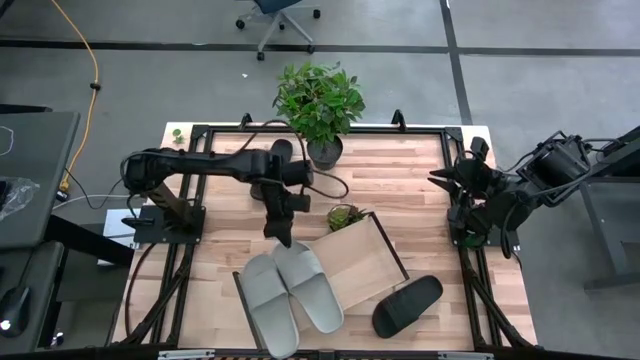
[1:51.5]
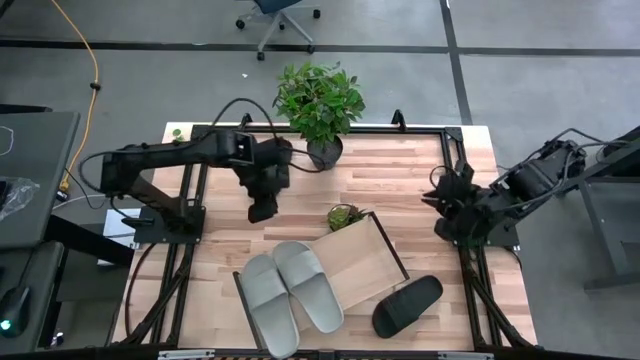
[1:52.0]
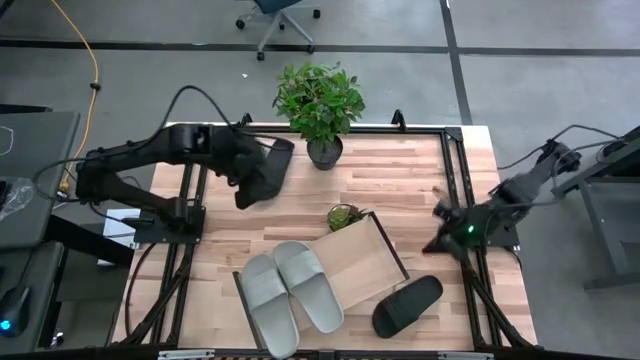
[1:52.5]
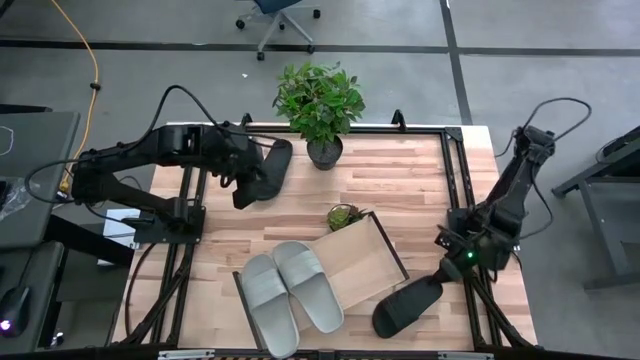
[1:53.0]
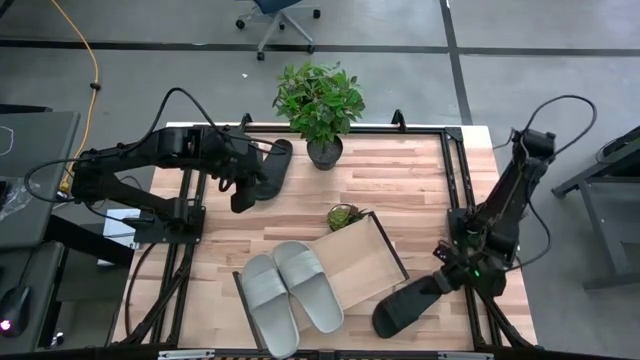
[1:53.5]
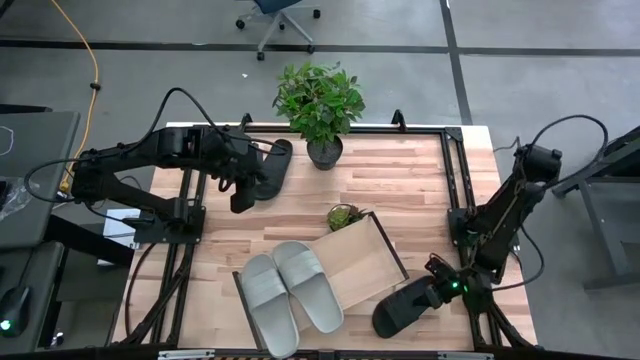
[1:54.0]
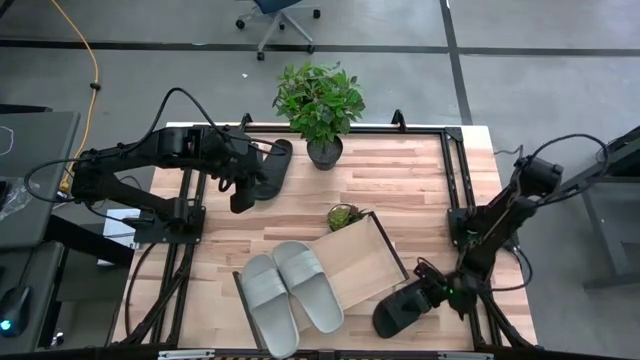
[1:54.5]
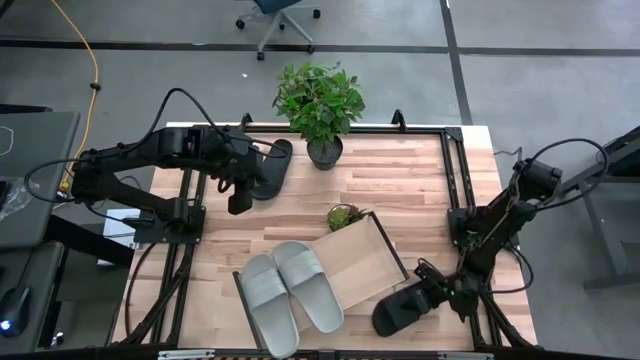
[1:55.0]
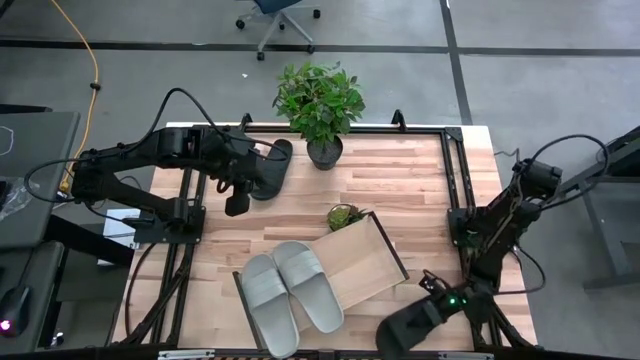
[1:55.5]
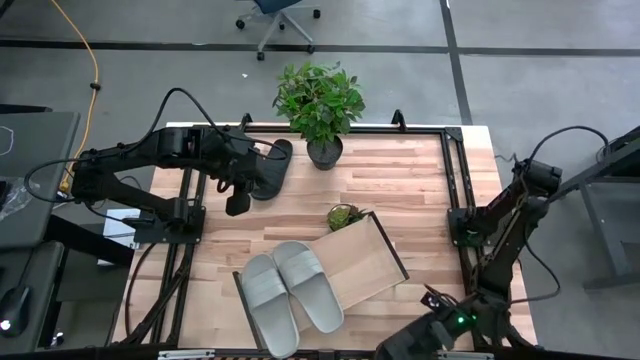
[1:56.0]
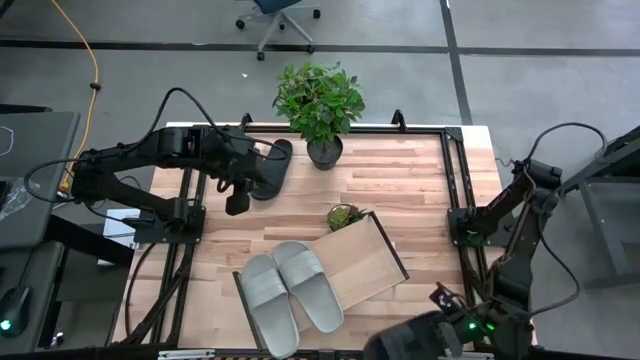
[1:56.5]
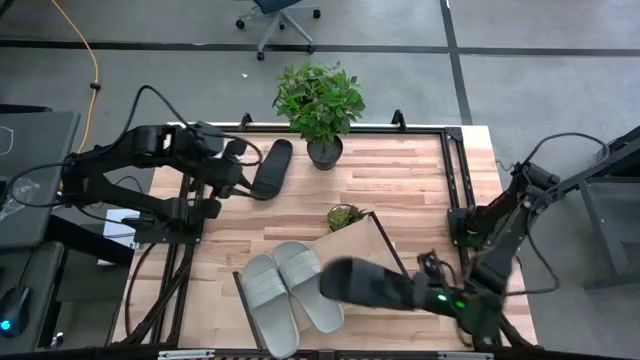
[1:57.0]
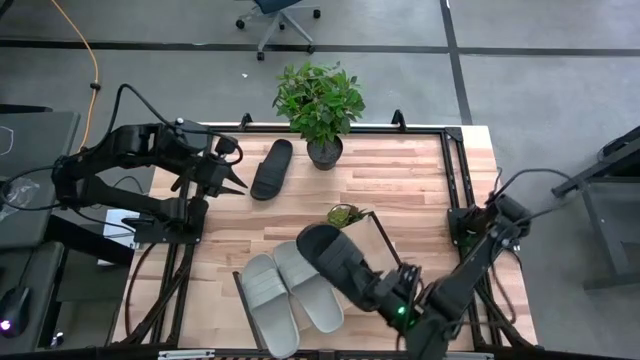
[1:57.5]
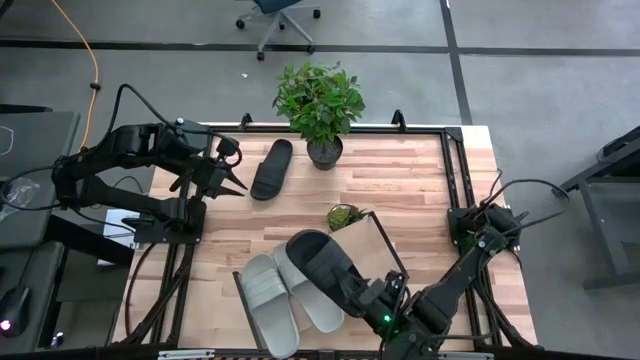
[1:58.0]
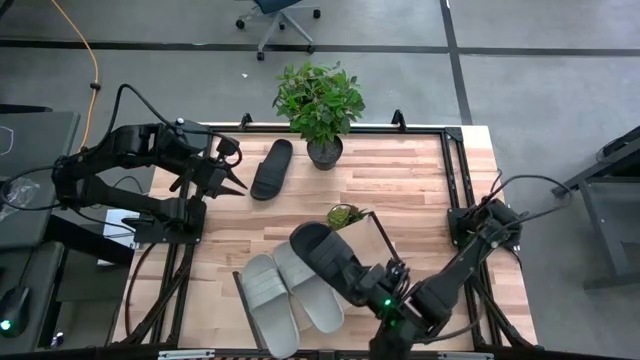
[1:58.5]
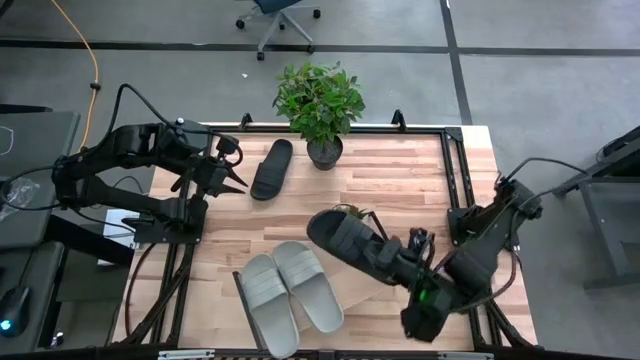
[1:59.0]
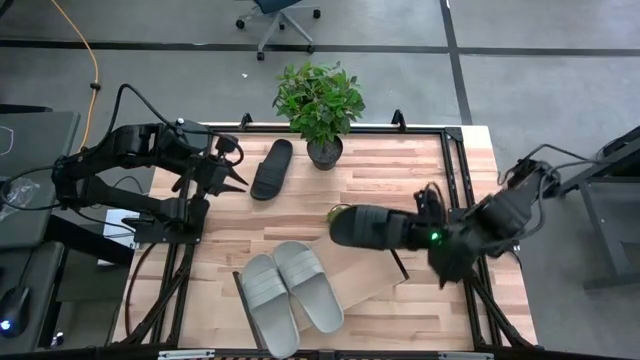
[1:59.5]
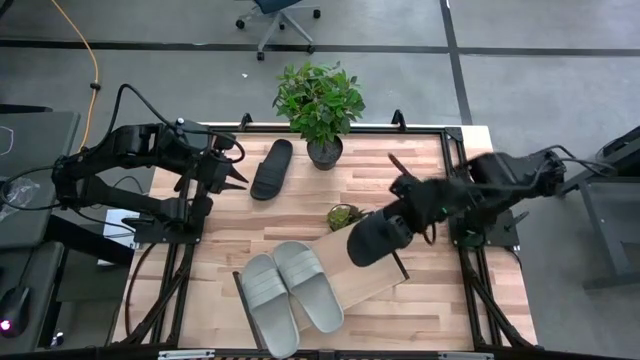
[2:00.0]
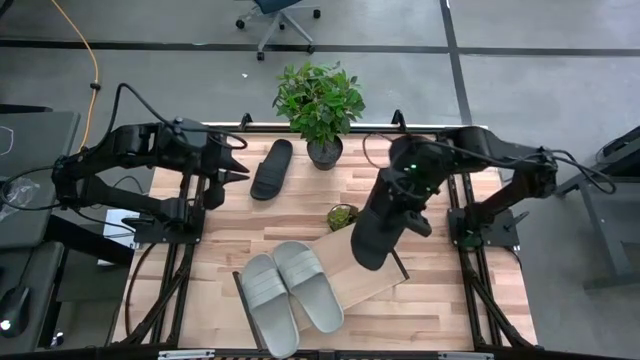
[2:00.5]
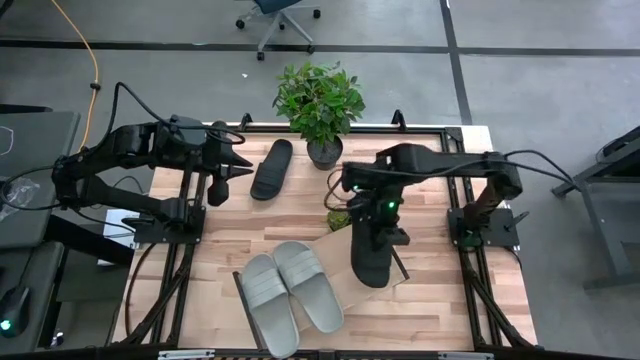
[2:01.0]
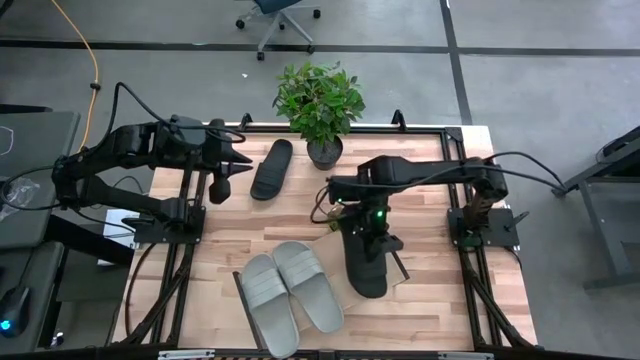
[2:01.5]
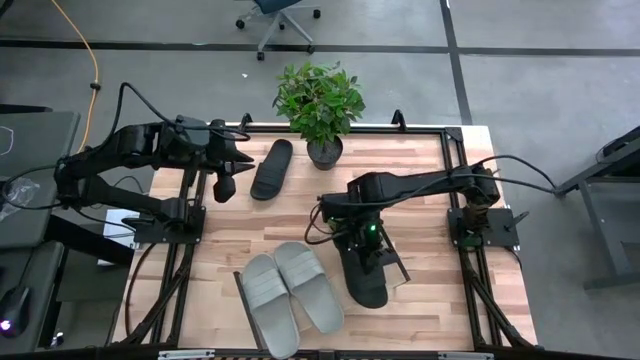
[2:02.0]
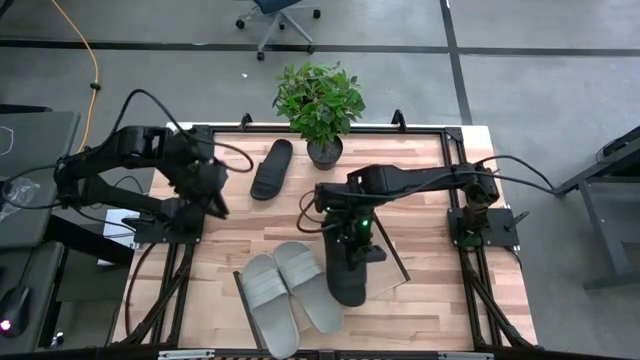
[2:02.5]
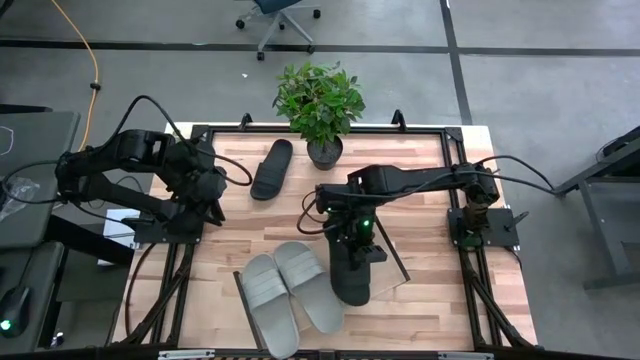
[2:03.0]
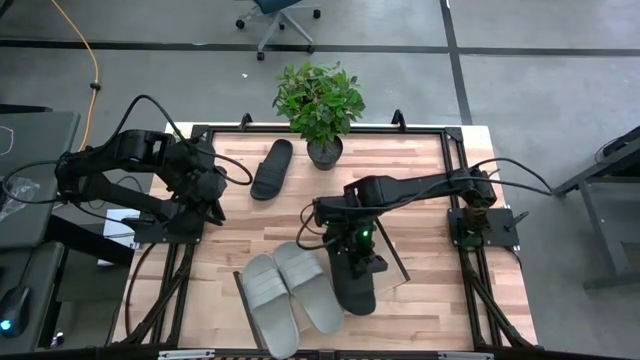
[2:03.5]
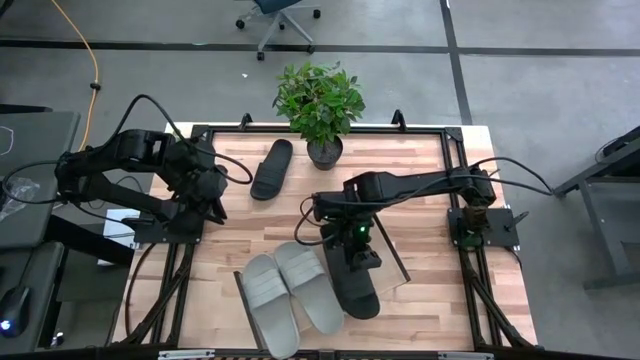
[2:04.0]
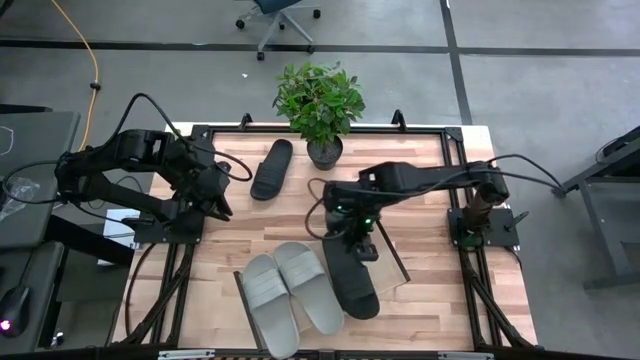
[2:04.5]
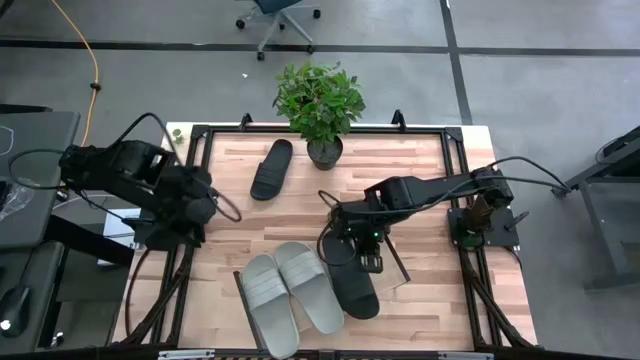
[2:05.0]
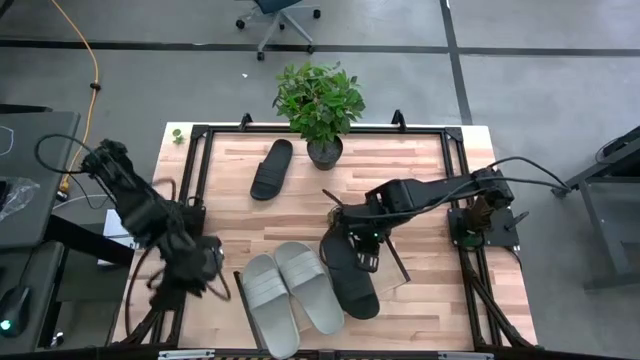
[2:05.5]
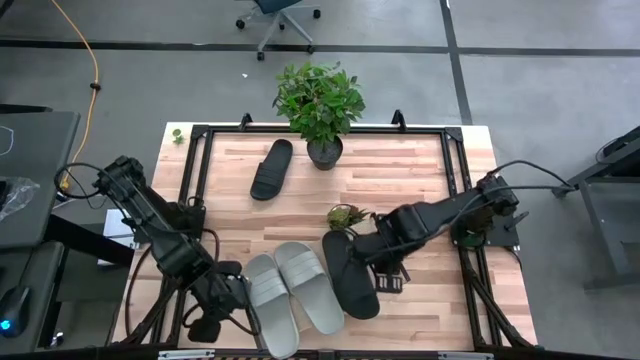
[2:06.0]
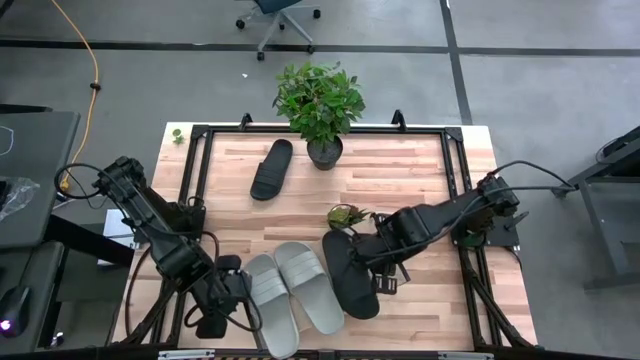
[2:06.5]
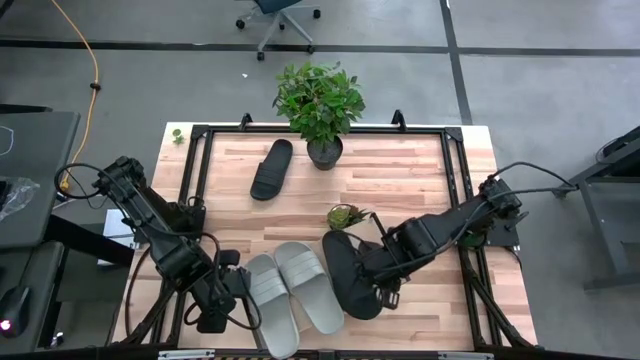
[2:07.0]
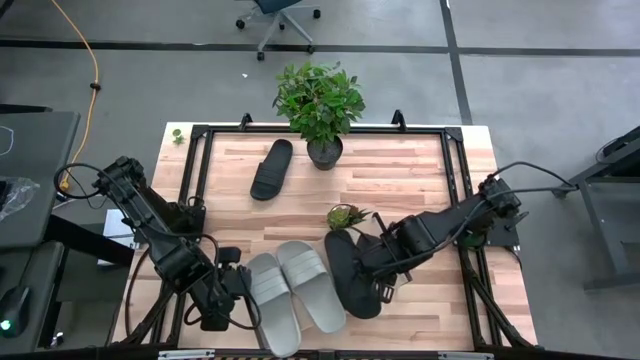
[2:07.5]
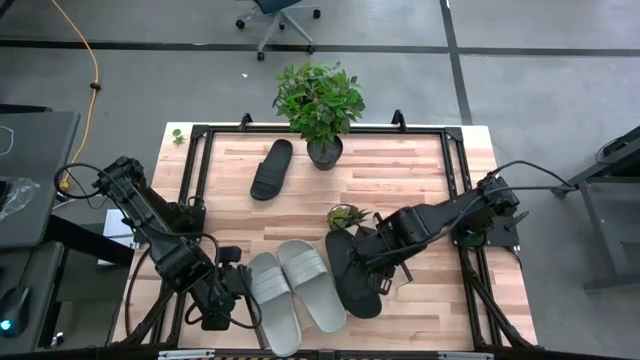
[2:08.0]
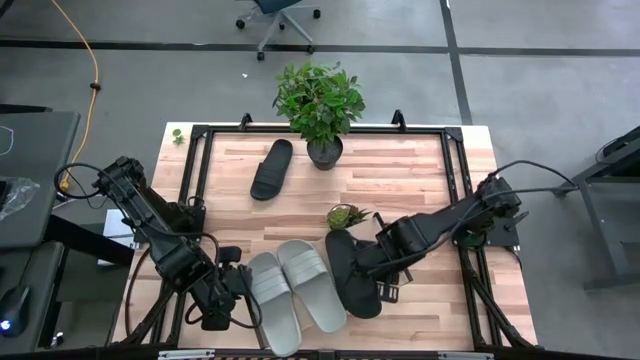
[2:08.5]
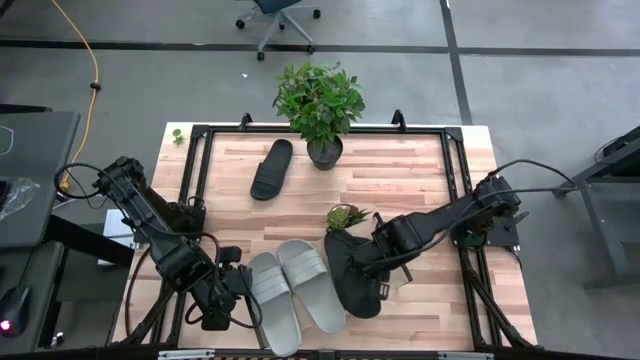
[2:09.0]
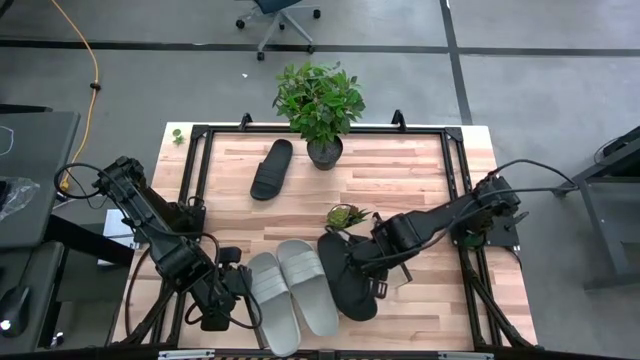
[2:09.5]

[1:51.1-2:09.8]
Task: Pick and place slides into the shelf
Put the bottom black slipper on the shelf

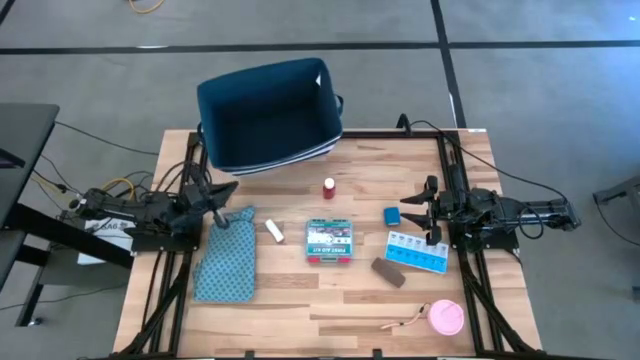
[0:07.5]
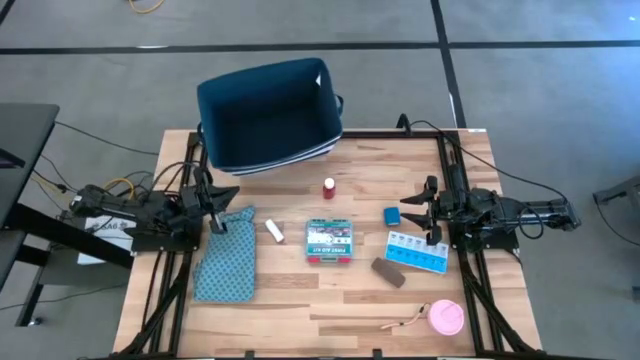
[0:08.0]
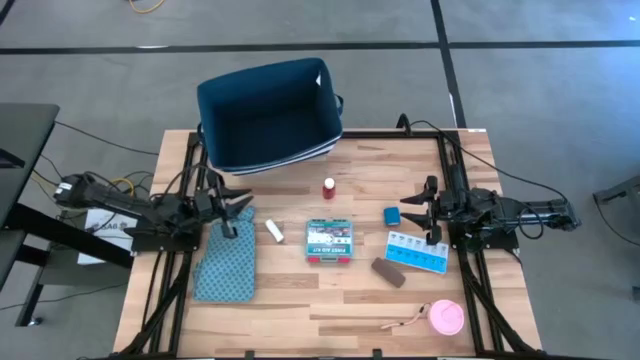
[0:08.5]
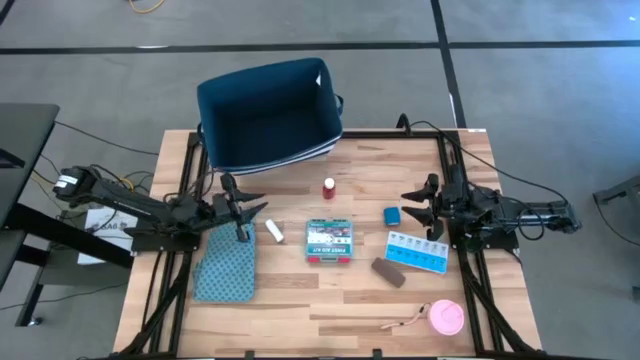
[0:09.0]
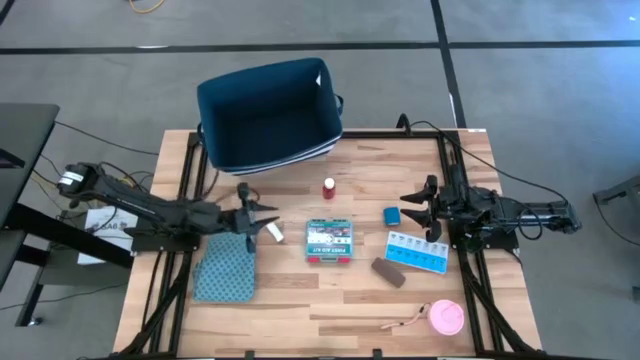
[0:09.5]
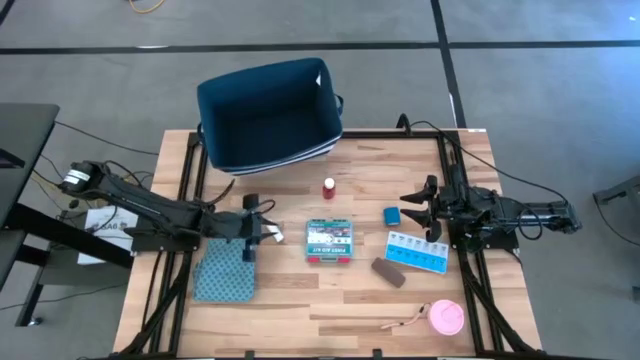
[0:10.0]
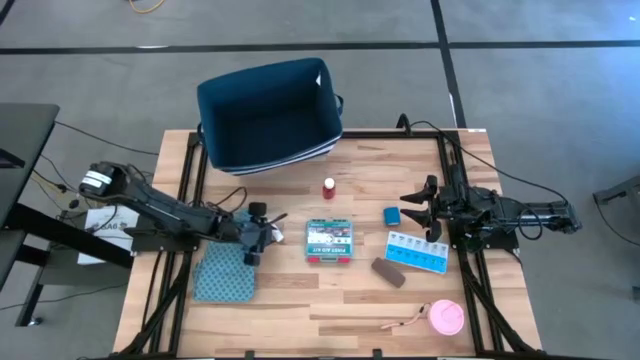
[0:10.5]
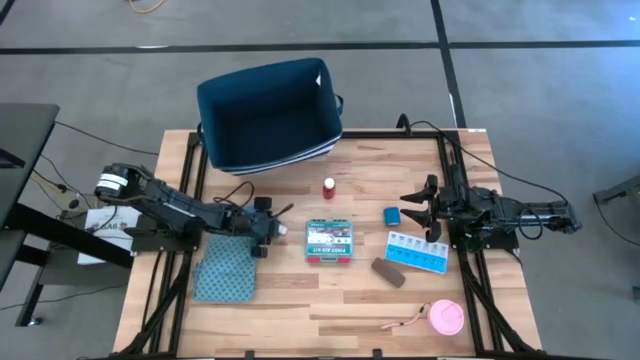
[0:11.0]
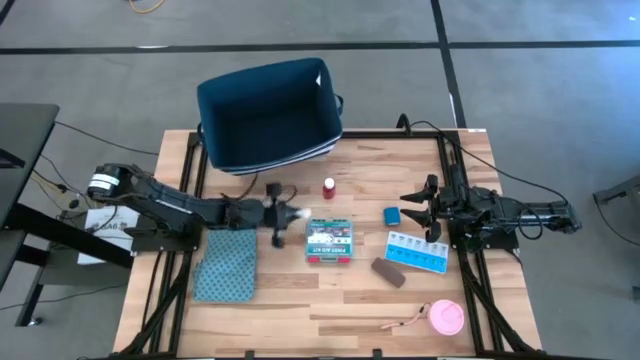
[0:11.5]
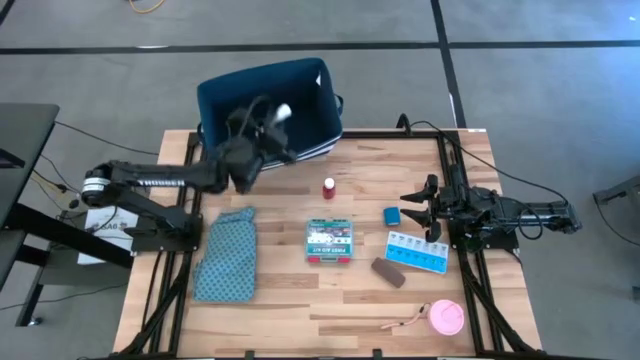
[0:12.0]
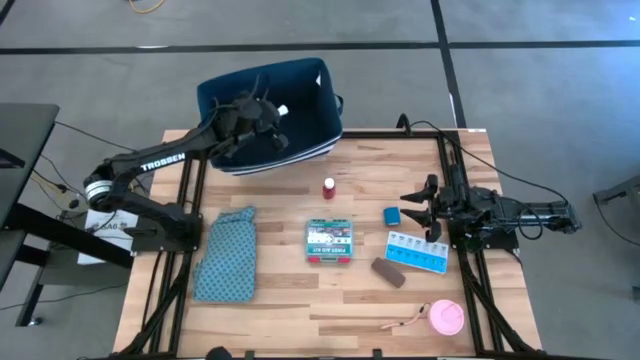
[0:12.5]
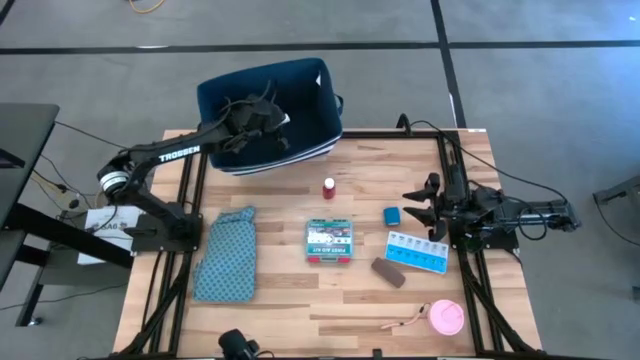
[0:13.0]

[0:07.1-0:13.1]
Task: Pick & place medical supplies in basket/bin
Put the rolled gauze into the blue bin
